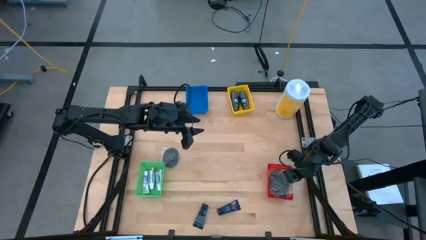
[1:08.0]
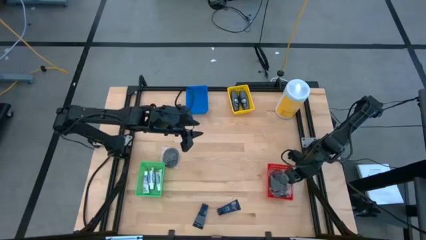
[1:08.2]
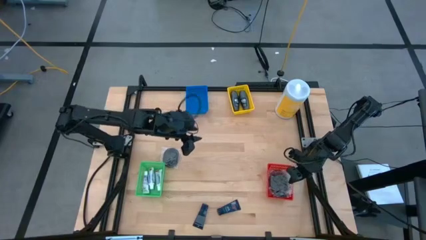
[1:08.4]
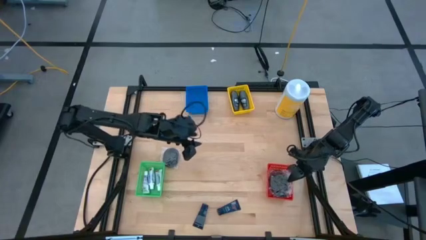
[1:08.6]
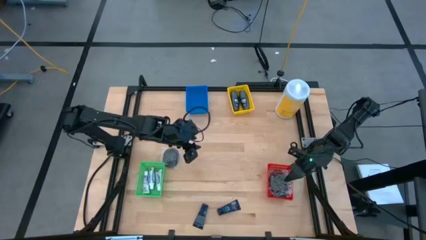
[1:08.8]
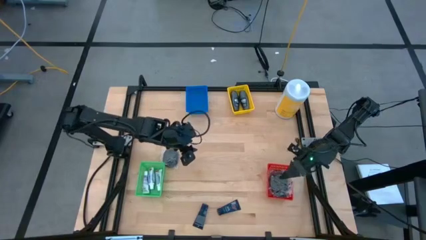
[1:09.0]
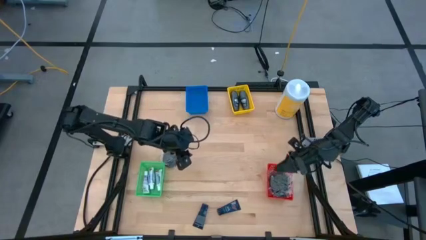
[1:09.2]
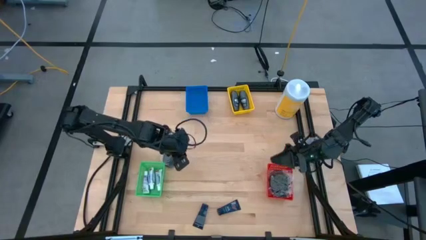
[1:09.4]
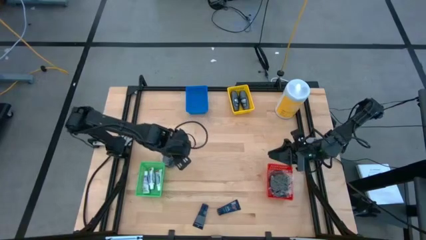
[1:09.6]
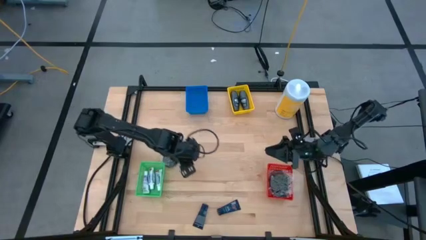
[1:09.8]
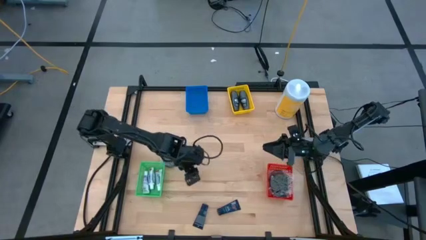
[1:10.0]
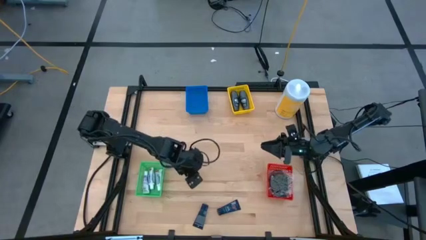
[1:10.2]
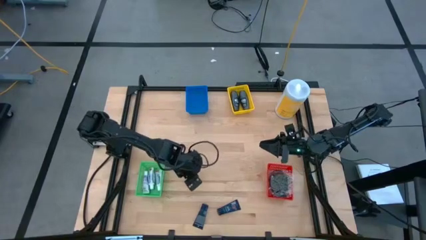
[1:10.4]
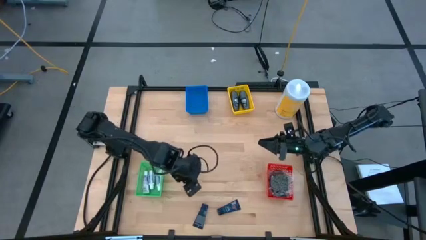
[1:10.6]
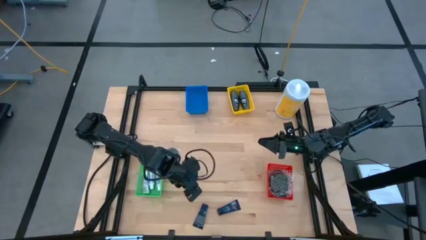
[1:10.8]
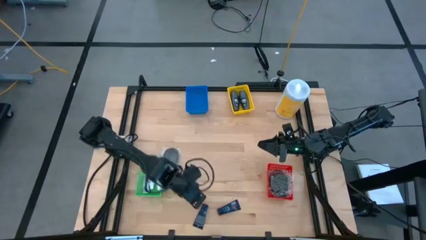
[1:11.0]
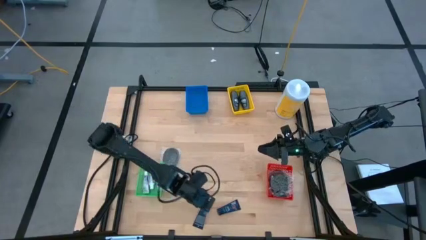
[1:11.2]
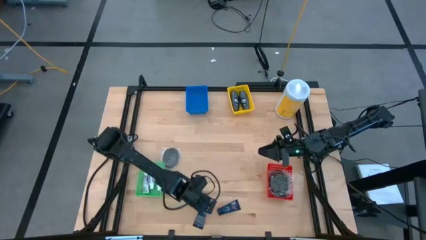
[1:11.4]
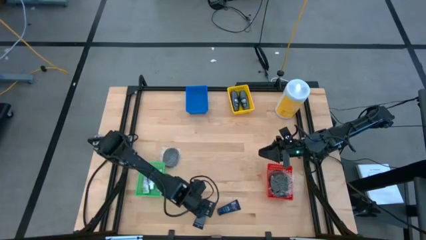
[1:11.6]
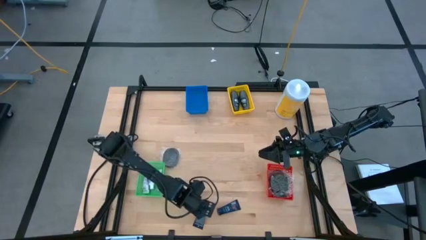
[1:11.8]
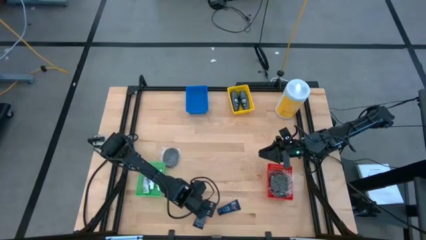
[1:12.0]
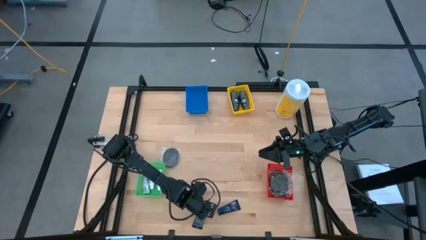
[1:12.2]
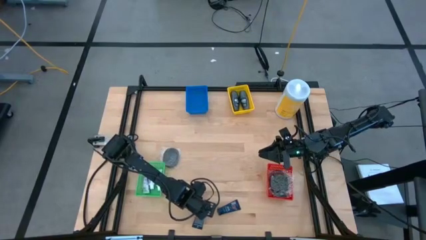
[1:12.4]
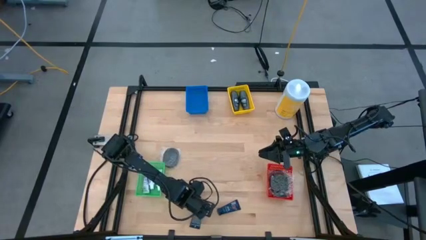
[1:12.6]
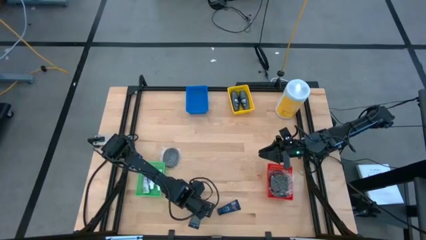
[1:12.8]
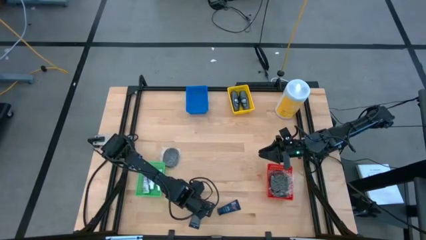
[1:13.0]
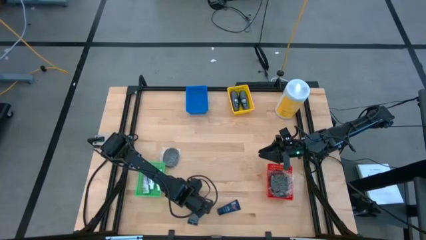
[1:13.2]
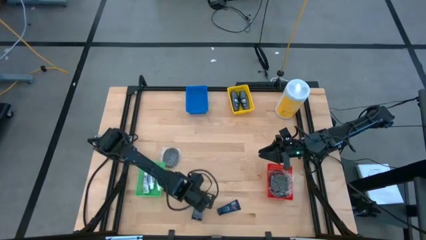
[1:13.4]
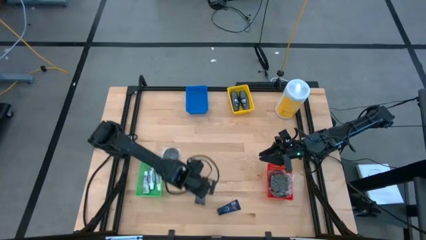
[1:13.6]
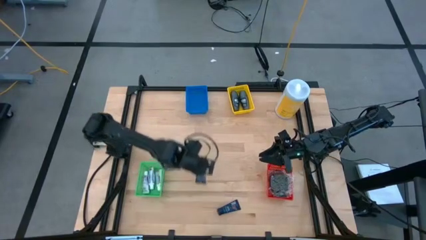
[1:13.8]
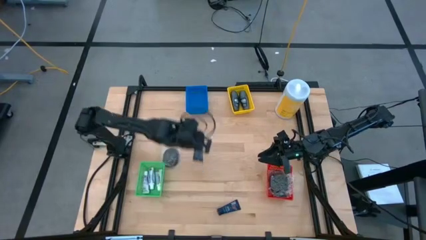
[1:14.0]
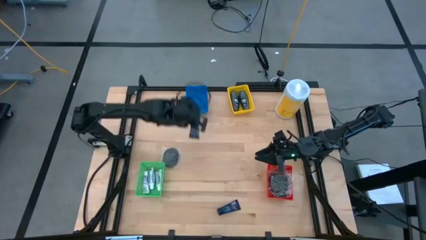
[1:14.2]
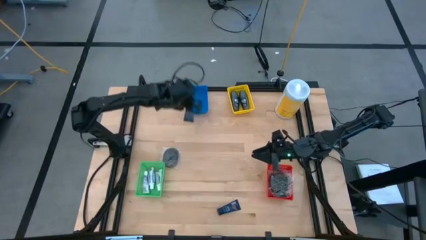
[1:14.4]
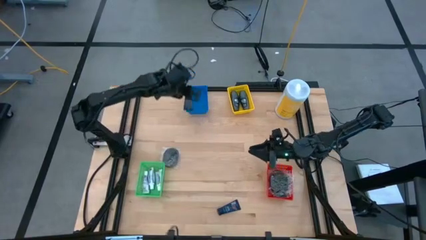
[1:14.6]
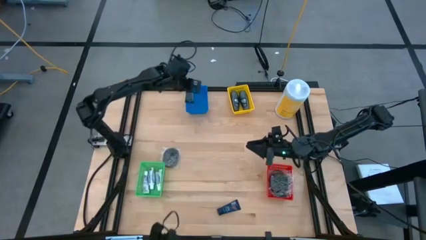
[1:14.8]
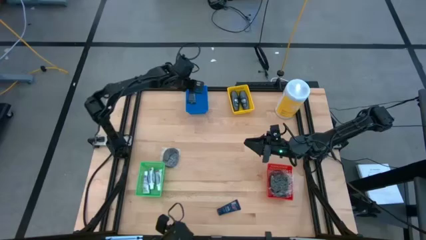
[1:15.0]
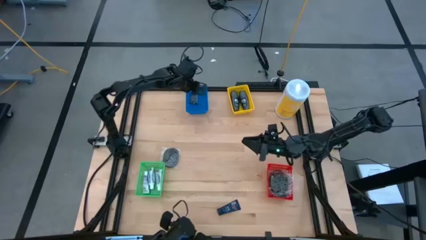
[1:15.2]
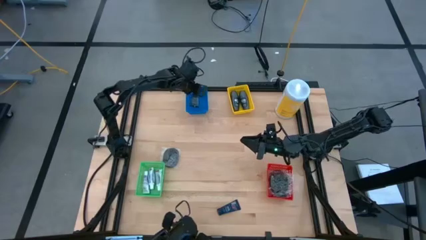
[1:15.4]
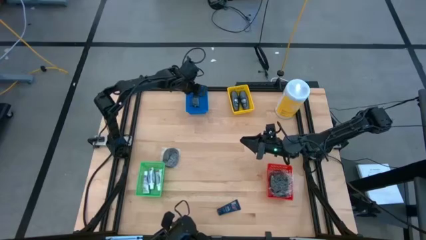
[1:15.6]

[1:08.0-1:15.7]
Task: Pick & Place Travel size toiletries
Put the blue shave cream into the blue bin

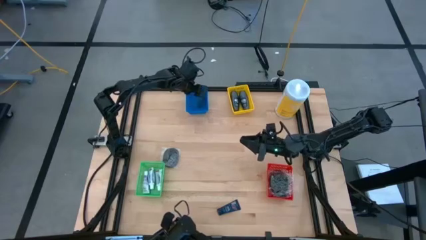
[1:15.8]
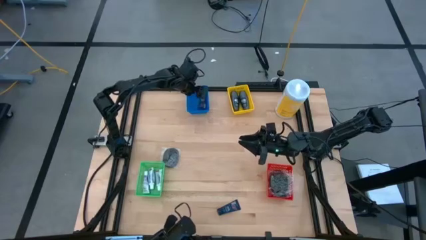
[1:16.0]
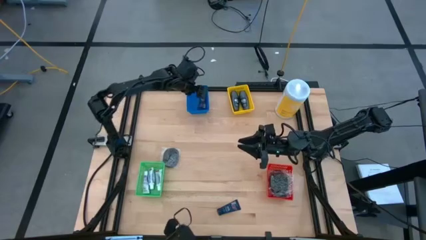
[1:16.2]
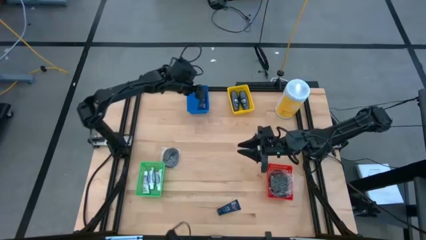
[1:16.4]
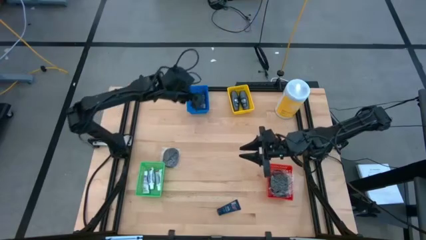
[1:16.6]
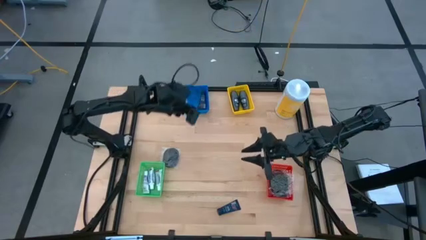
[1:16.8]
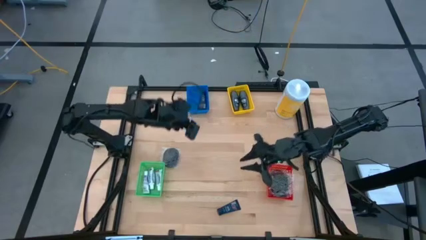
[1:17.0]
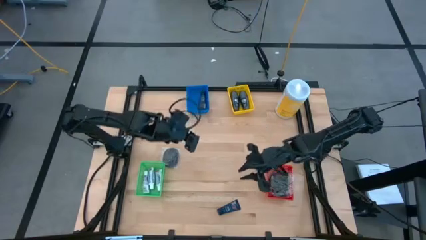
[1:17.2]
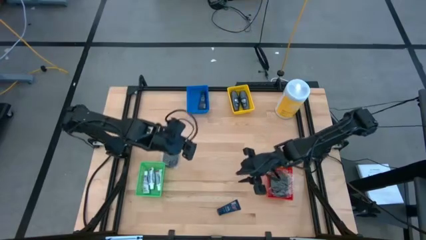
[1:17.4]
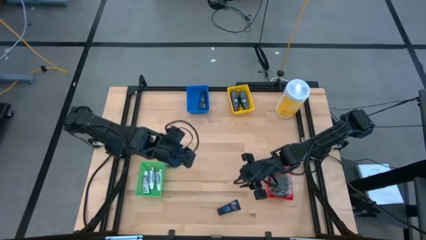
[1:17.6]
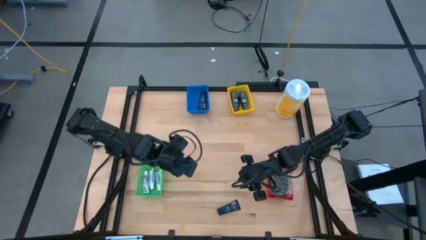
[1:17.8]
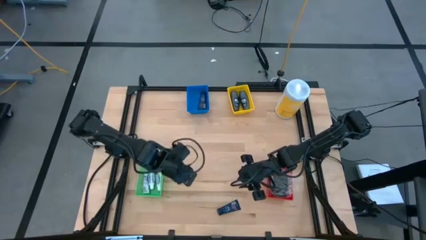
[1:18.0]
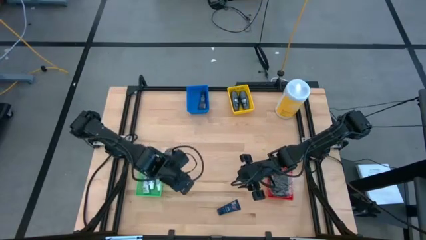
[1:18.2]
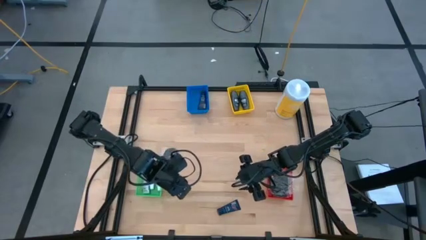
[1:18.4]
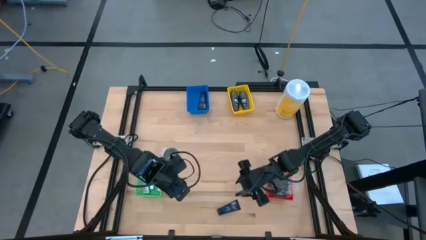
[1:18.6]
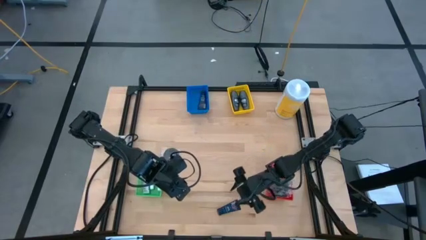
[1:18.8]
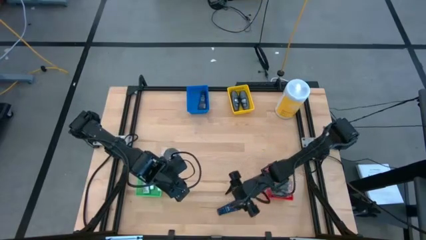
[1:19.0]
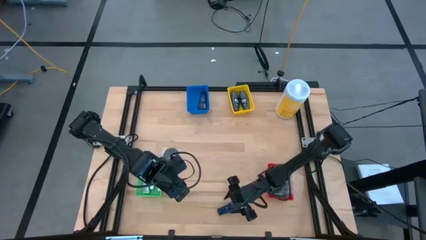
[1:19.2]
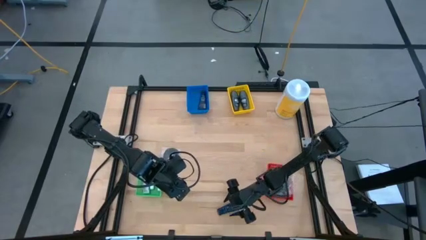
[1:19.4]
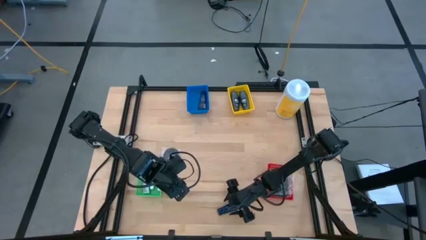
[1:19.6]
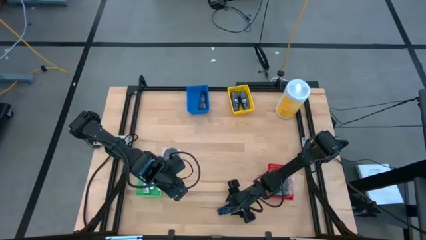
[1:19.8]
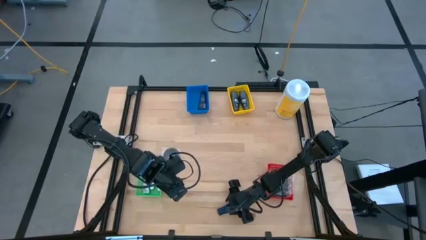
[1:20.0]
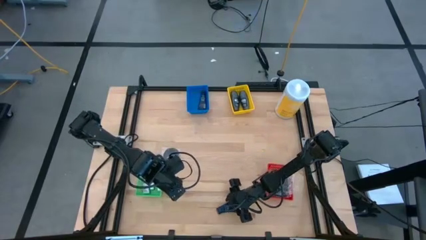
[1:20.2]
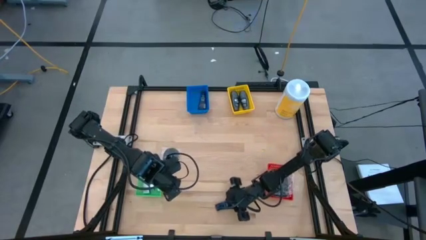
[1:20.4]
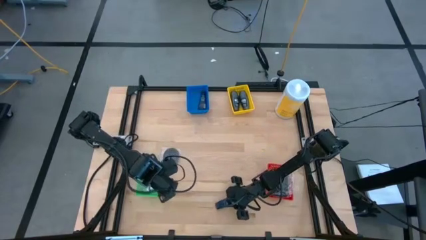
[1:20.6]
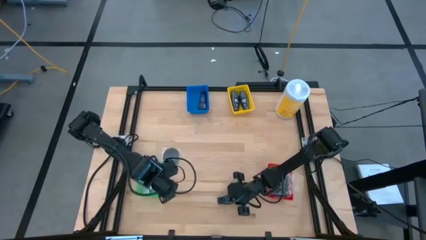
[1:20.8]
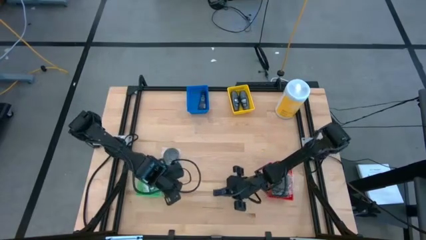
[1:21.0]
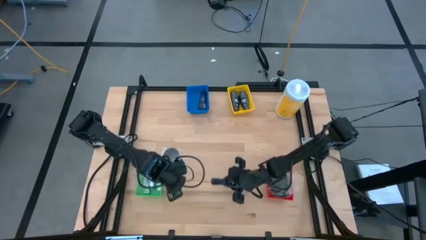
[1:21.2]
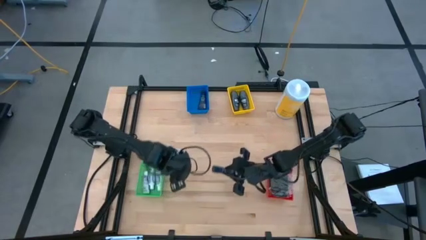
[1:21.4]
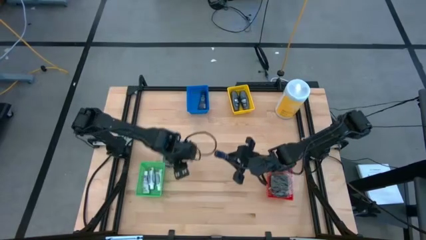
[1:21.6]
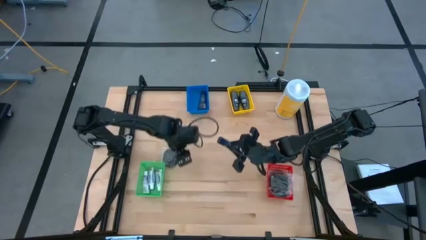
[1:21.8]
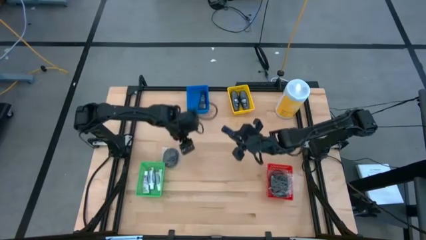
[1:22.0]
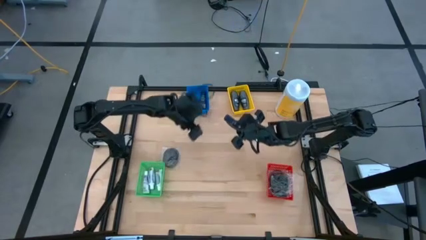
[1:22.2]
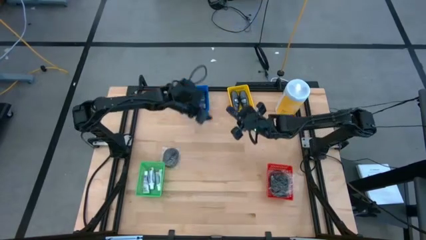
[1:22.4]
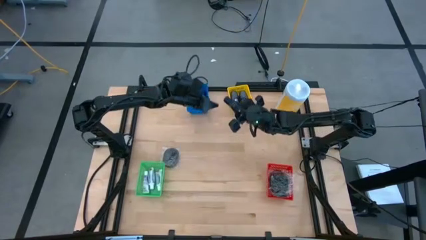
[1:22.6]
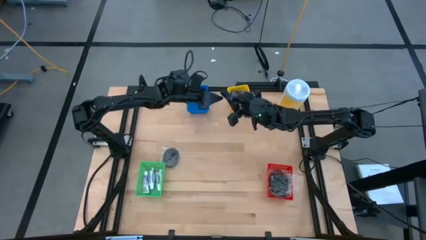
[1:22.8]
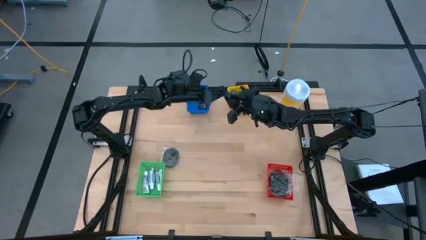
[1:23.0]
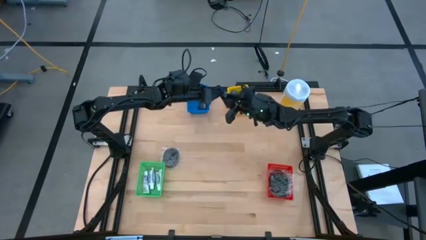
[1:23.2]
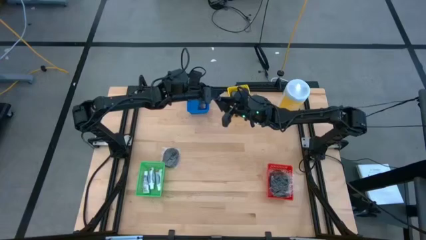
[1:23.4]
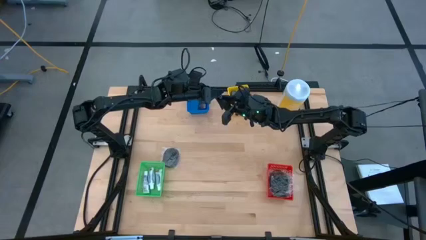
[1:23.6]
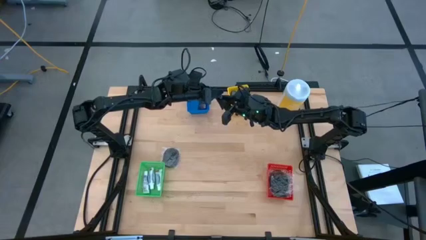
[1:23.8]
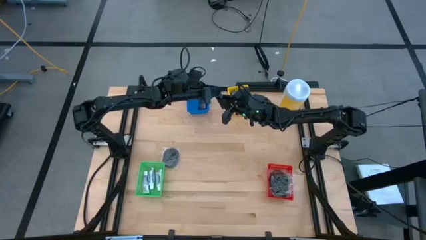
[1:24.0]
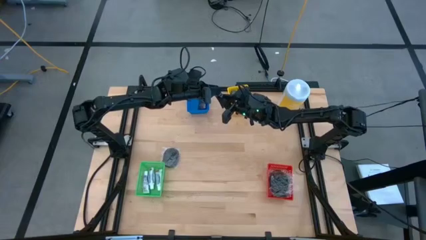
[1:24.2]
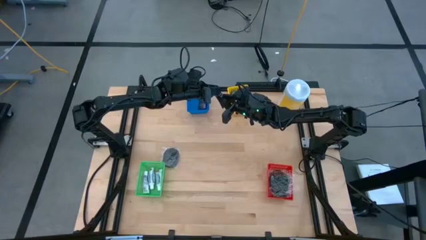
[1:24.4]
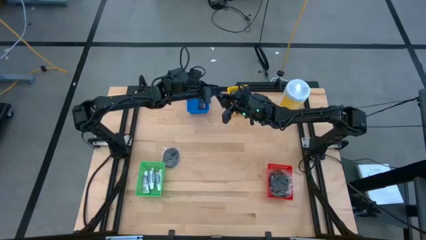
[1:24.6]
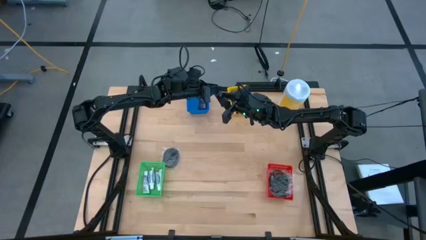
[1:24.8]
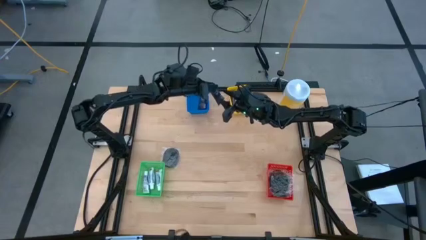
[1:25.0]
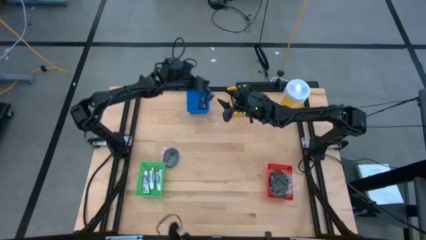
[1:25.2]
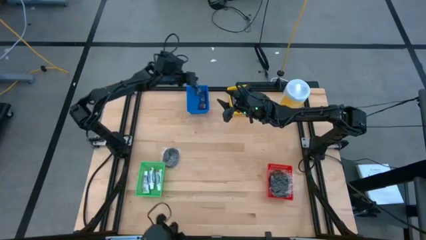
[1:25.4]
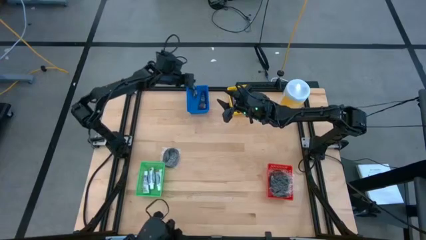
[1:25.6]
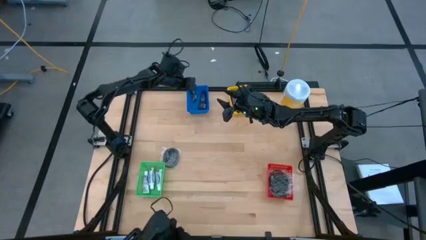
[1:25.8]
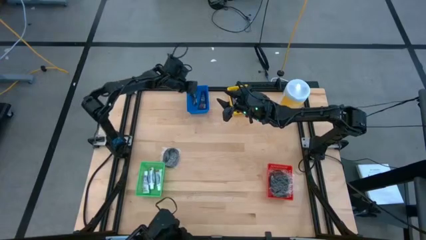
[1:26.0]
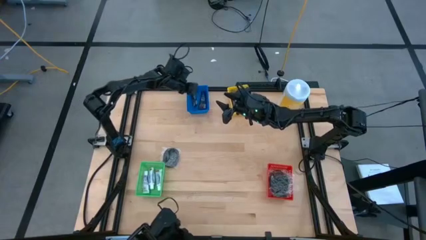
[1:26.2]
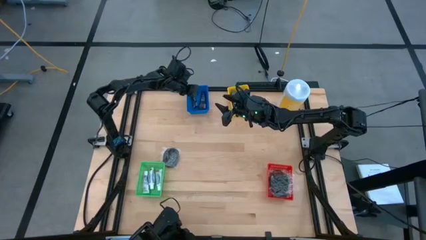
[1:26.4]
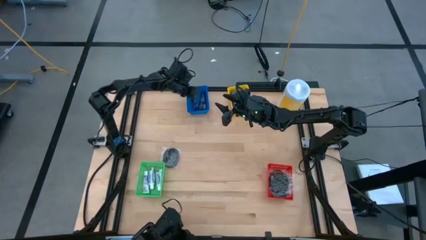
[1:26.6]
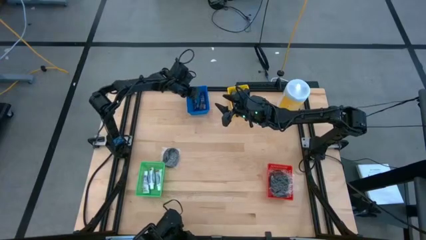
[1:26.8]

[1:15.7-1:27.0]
Put the blue shave cream into the blue bin
